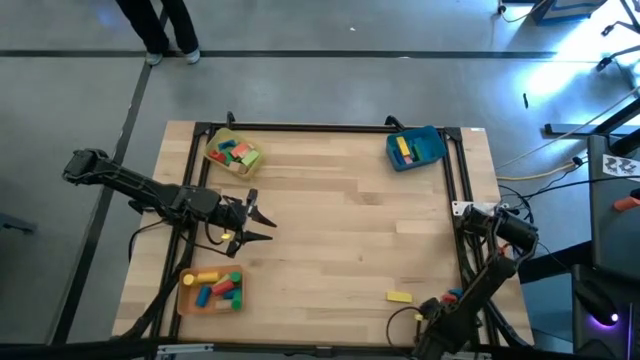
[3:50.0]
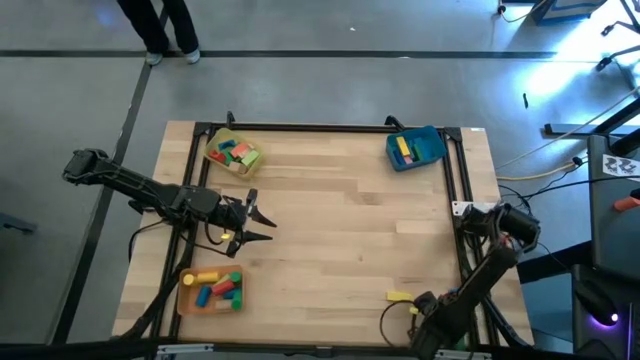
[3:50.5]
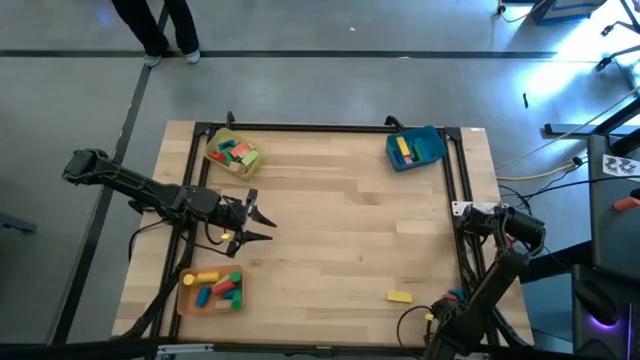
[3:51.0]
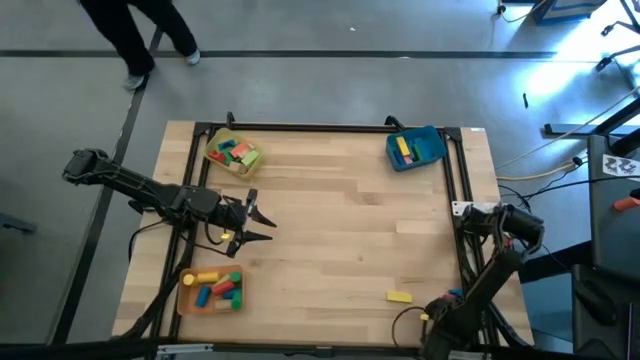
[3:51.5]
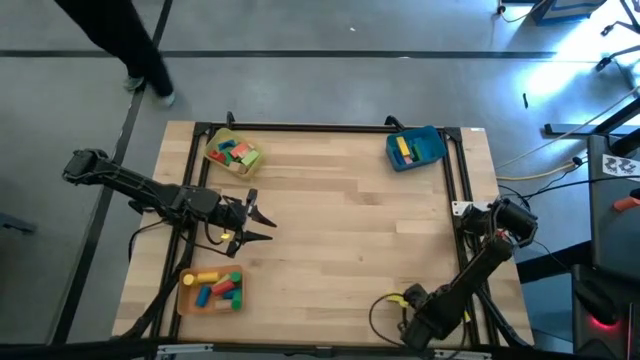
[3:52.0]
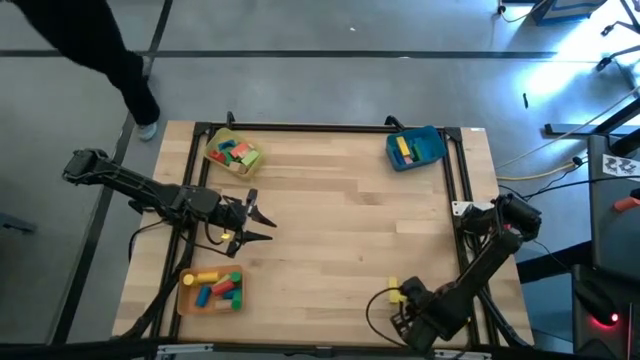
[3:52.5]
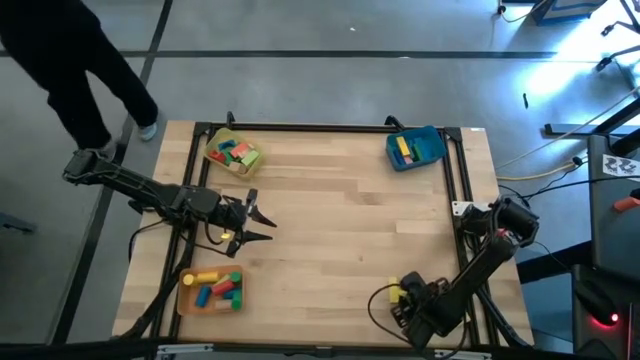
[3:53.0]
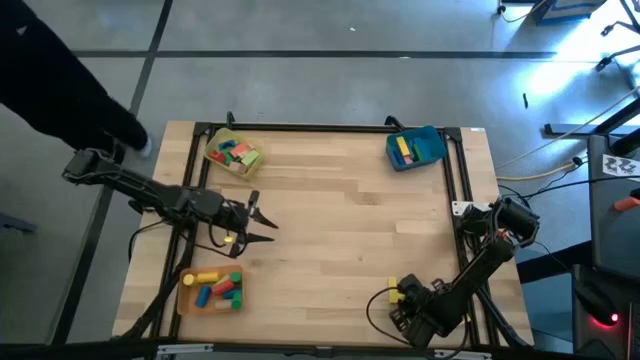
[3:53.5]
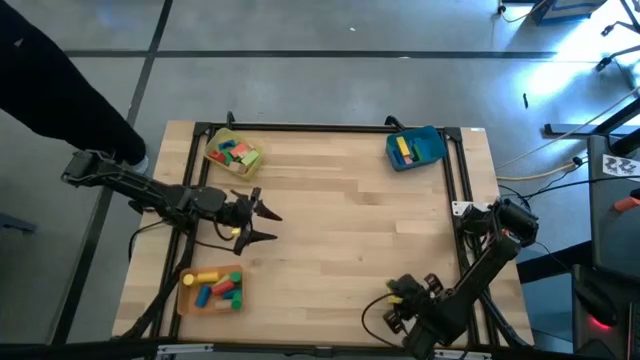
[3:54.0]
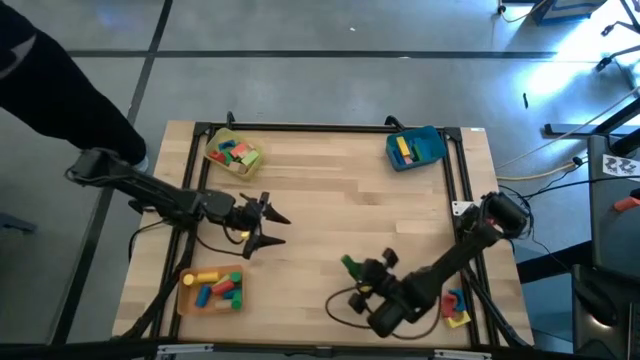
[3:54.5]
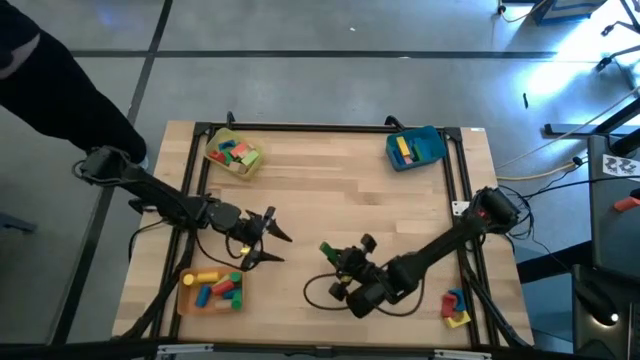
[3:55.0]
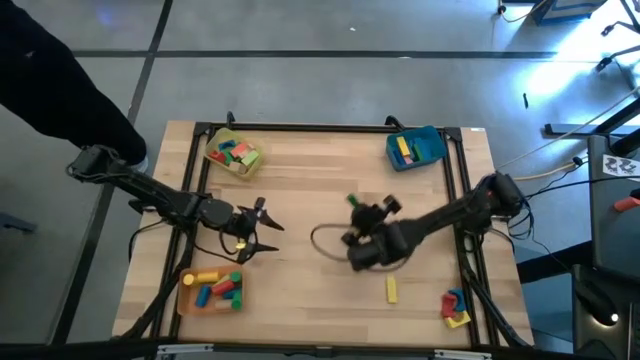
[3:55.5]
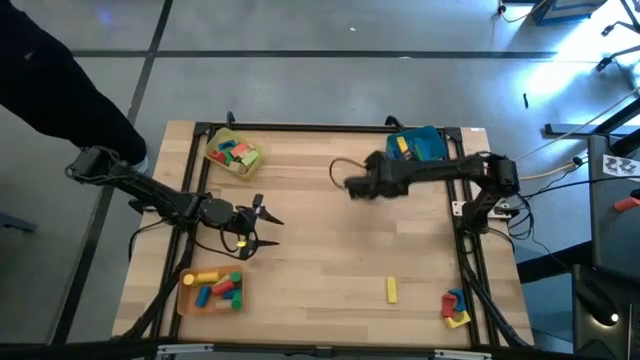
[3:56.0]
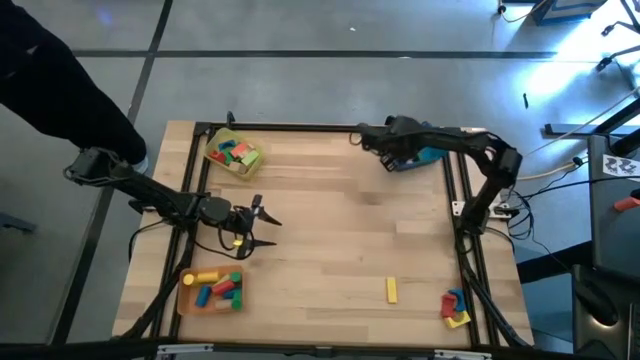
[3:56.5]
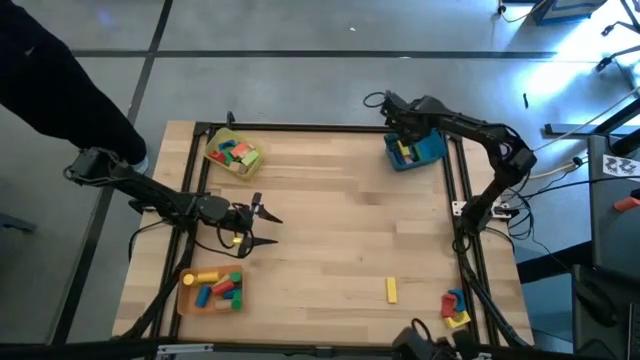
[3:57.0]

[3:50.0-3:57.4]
Task: Sort blocks by size
Put the green rectangular block into the blue bin

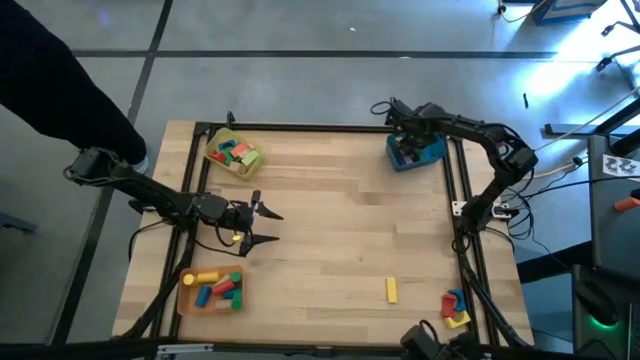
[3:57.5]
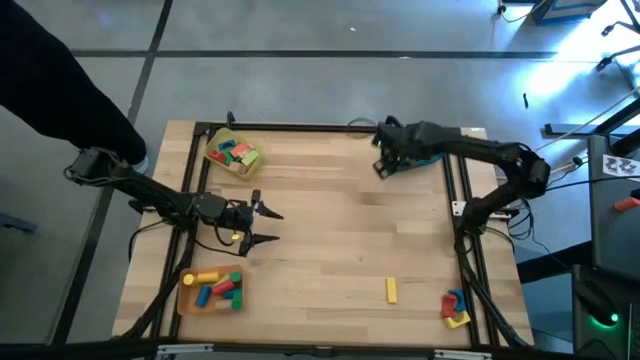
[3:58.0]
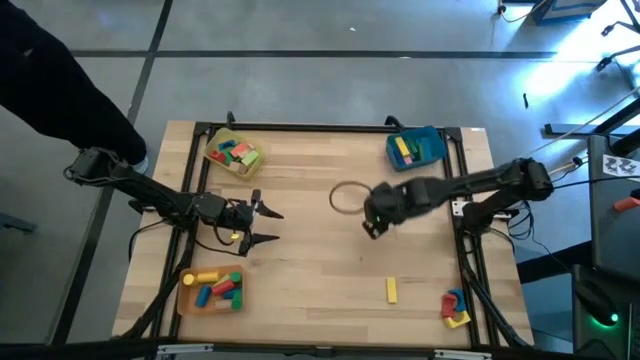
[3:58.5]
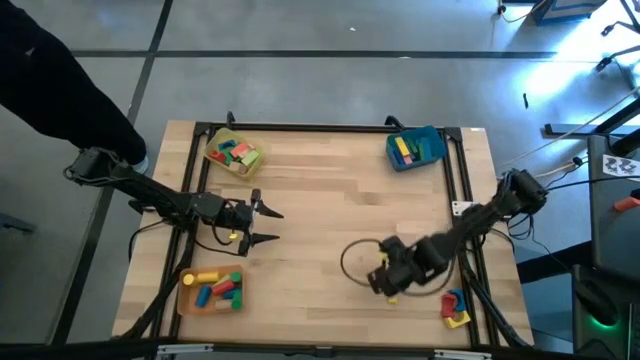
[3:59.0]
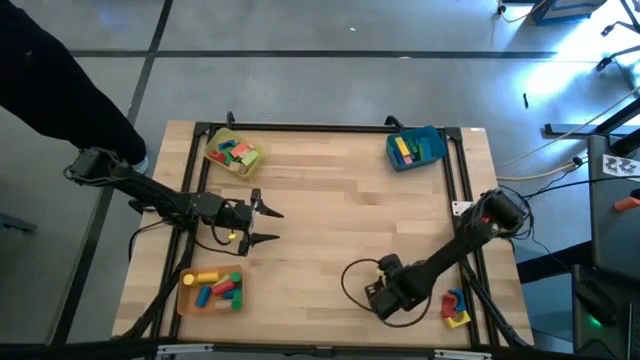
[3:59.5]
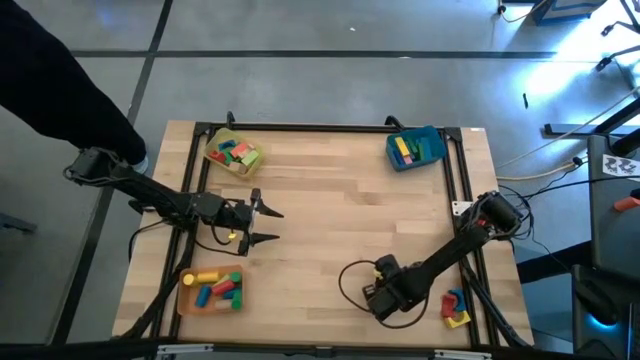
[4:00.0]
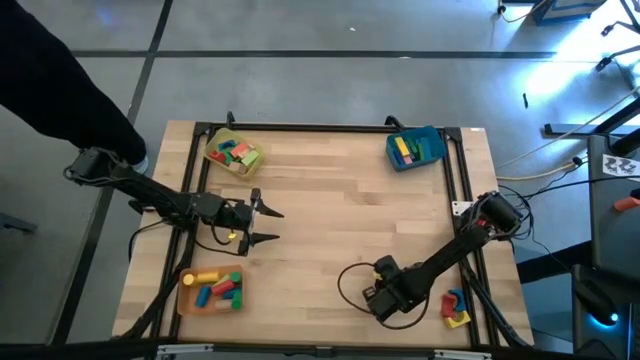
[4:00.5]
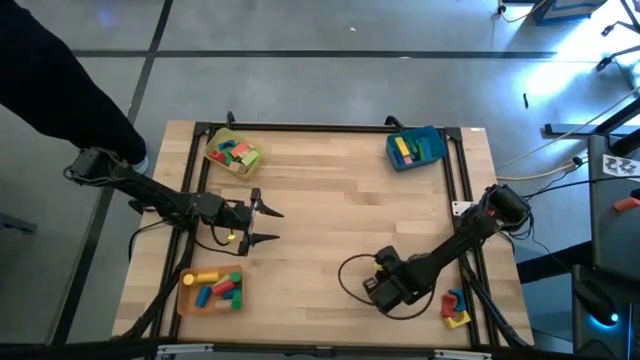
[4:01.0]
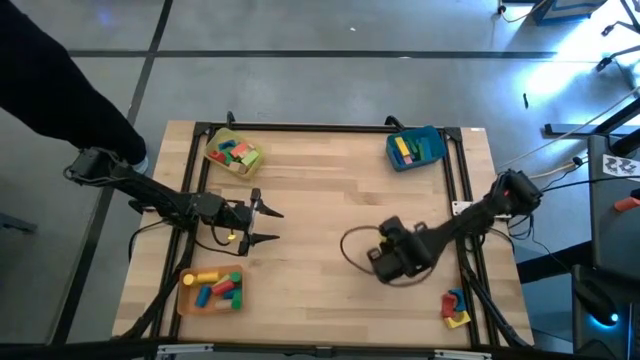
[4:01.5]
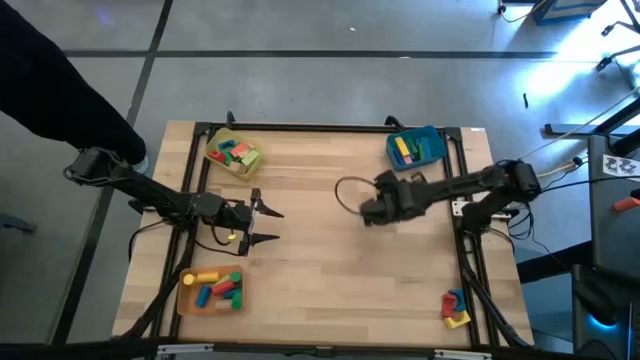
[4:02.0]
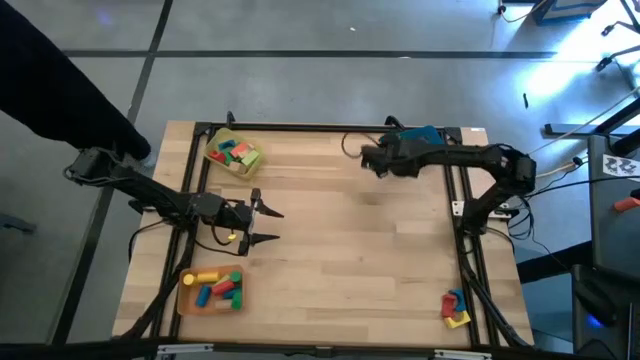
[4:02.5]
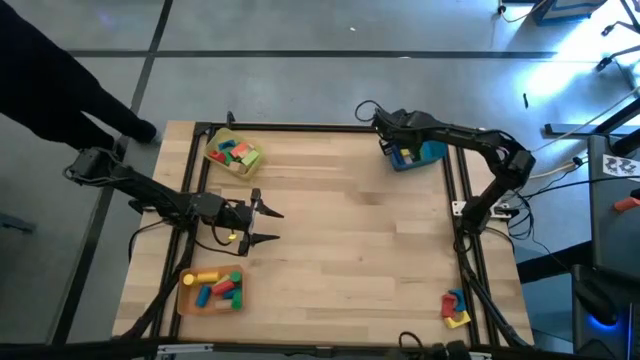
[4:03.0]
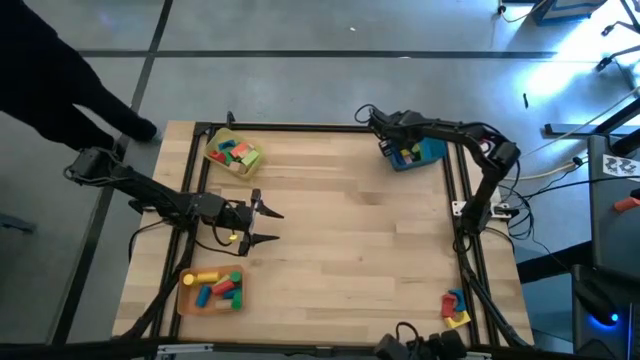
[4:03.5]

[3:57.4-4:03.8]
Put the yellow rectangular block into the blue bin

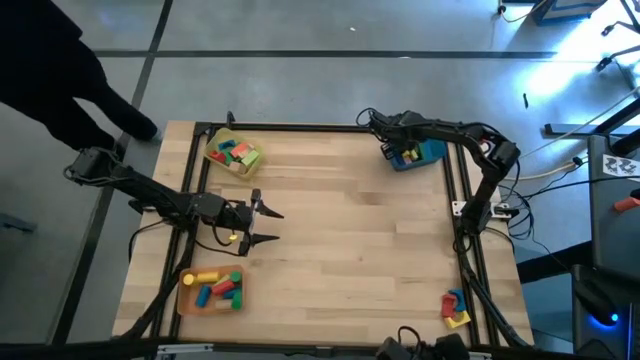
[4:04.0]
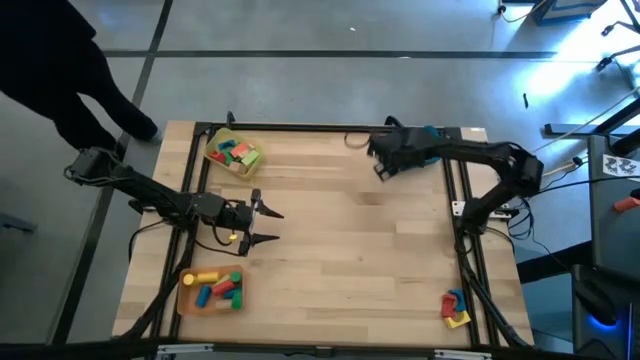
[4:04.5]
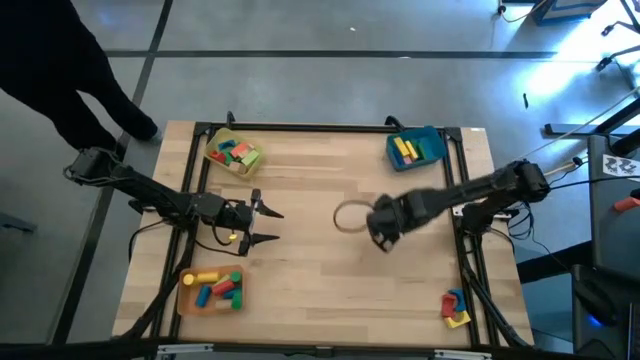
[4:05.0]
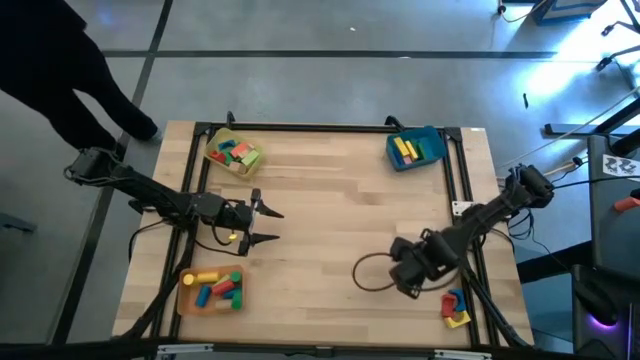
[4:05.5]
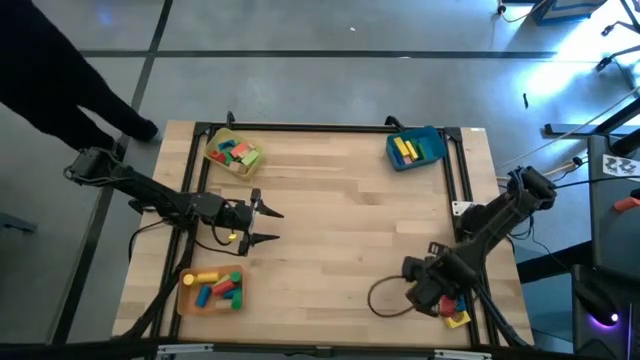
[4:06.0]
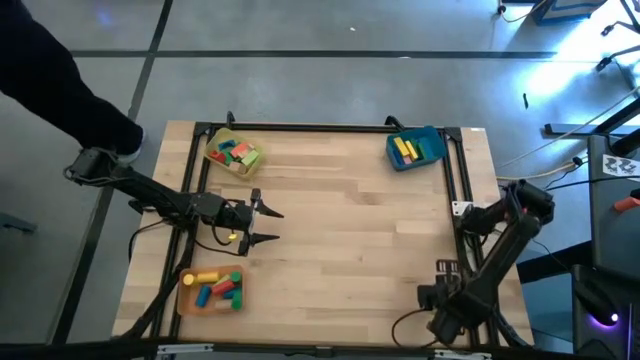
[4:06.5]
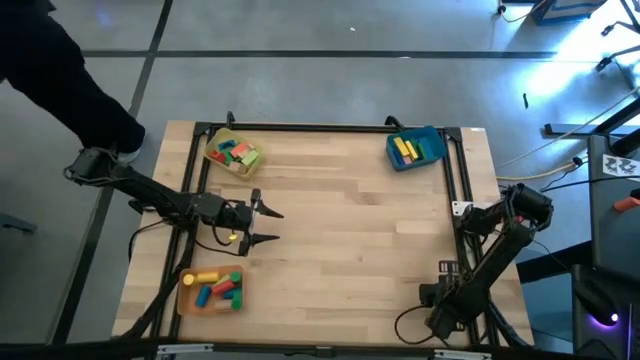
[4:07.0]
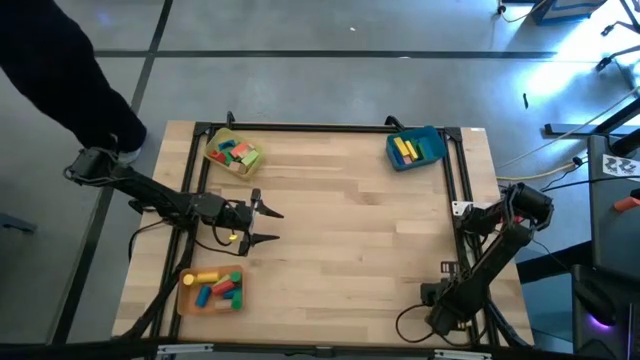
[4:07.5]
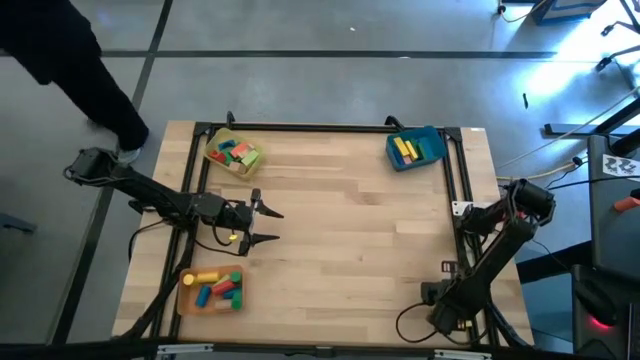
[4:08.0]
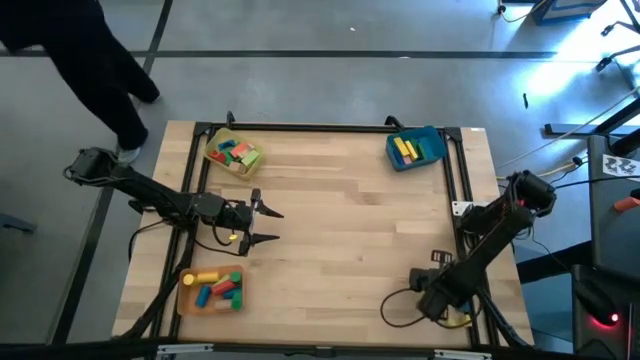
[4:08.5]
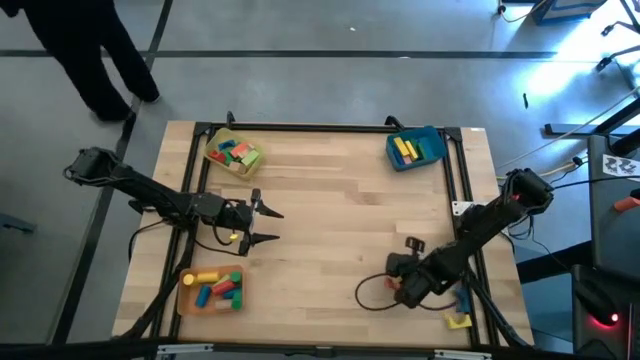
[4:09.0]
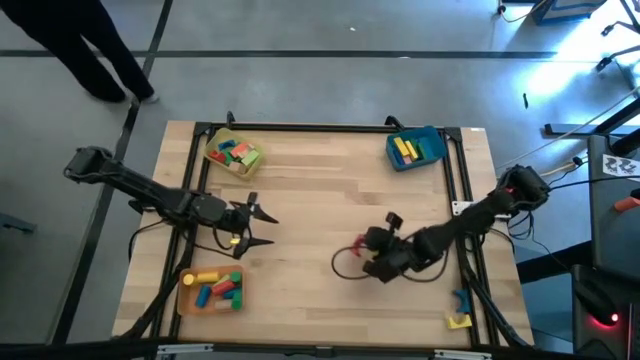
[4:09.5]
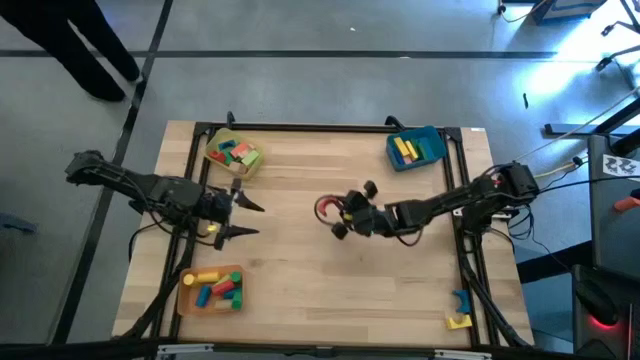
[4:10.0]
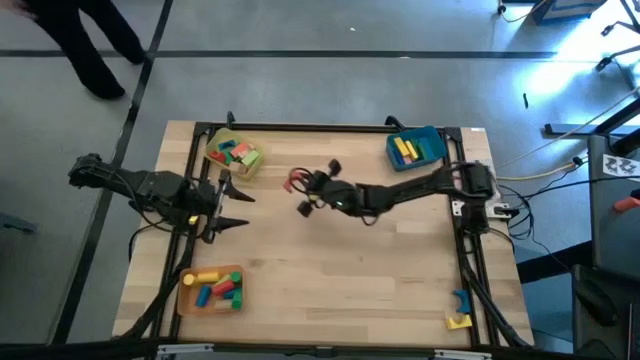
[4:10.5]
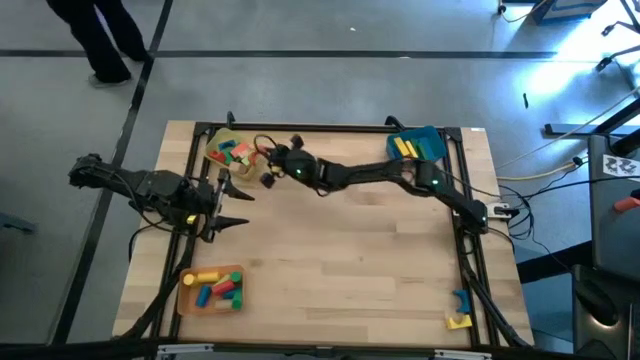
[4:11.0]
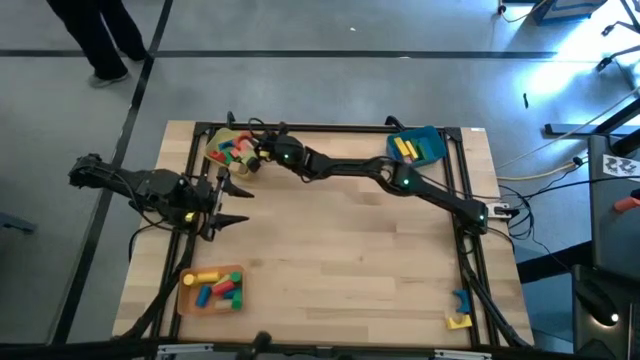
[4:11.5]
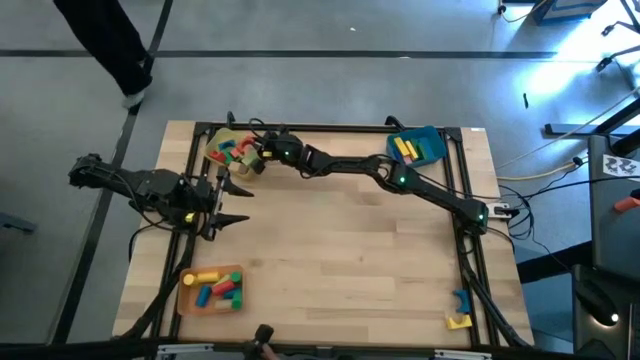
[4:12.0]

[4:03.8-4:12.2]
Put the red arch block into the yellow bin
